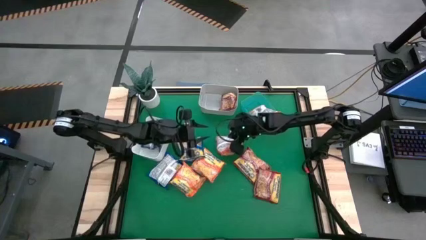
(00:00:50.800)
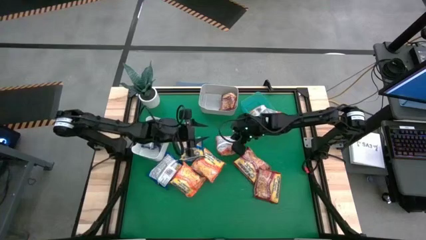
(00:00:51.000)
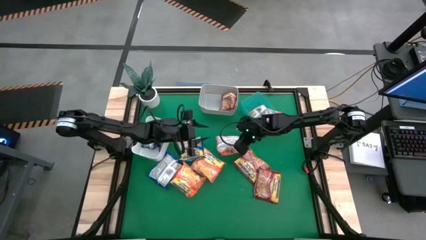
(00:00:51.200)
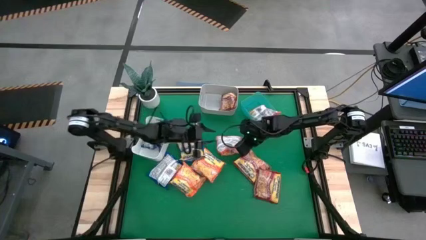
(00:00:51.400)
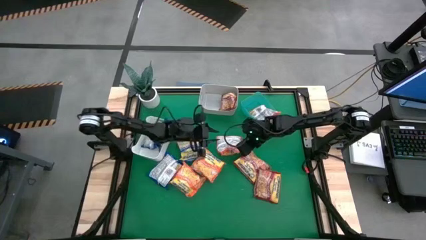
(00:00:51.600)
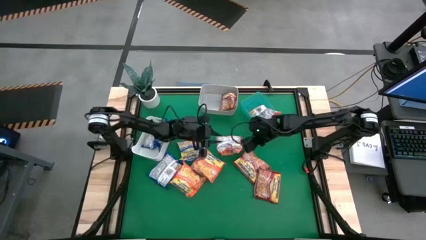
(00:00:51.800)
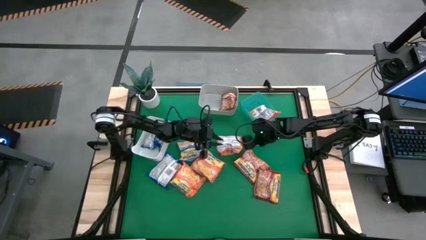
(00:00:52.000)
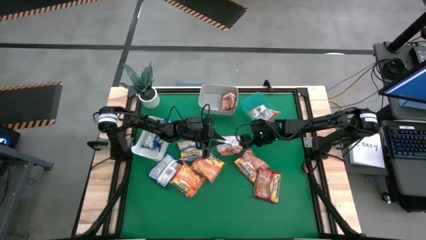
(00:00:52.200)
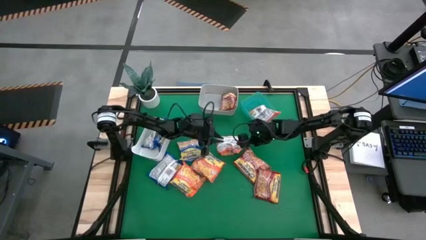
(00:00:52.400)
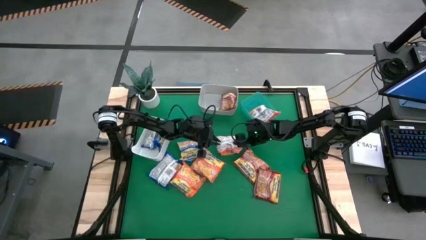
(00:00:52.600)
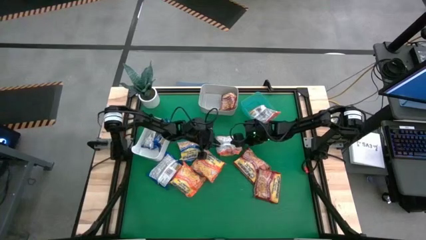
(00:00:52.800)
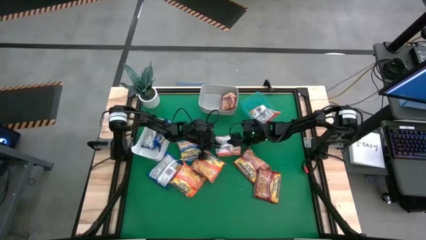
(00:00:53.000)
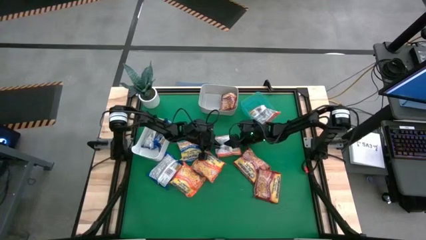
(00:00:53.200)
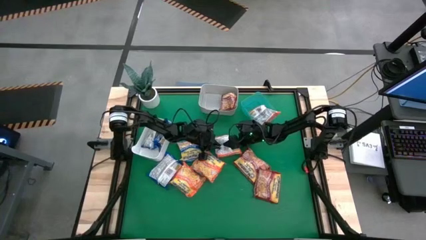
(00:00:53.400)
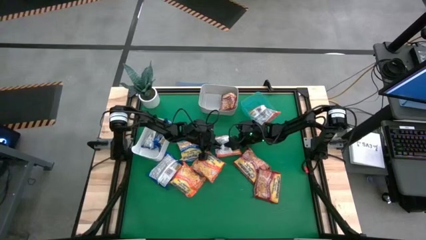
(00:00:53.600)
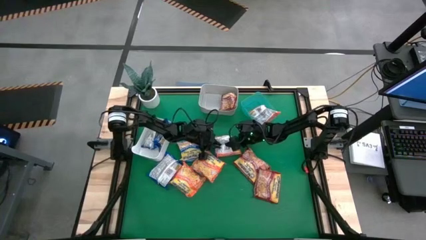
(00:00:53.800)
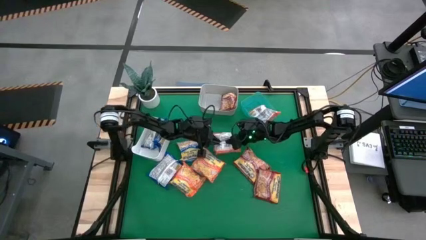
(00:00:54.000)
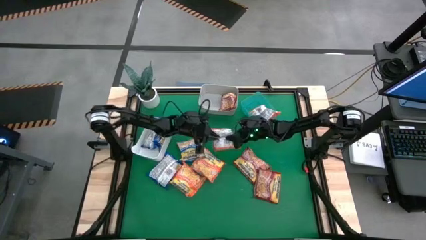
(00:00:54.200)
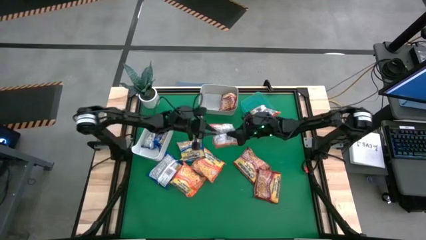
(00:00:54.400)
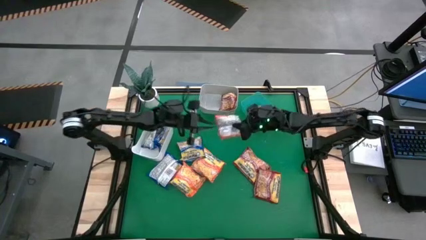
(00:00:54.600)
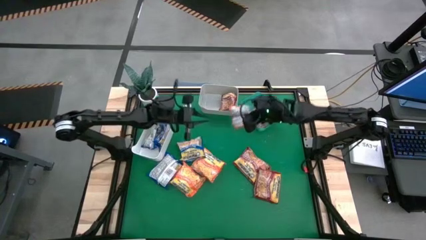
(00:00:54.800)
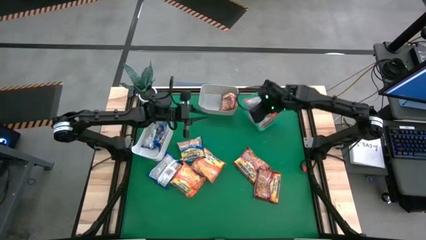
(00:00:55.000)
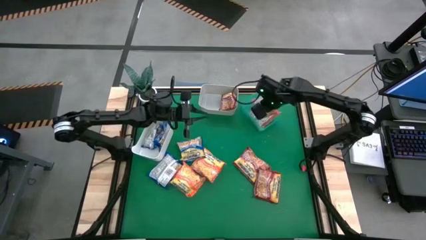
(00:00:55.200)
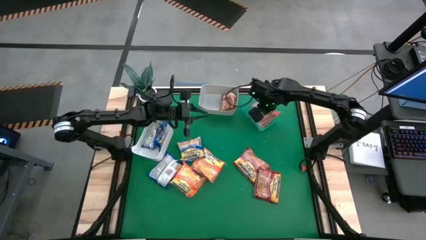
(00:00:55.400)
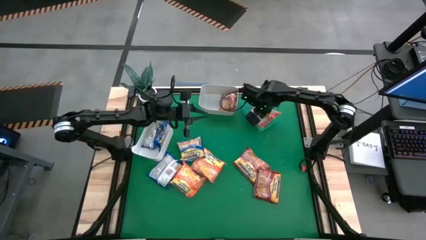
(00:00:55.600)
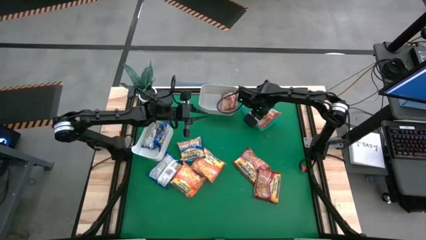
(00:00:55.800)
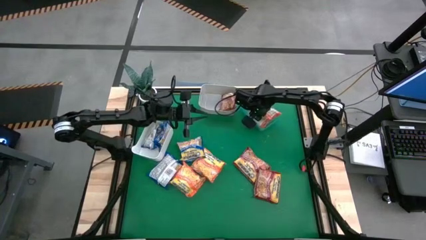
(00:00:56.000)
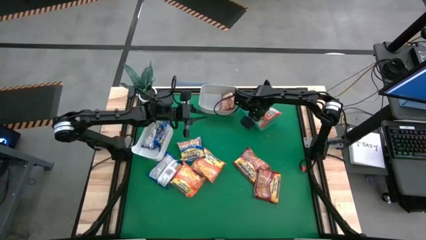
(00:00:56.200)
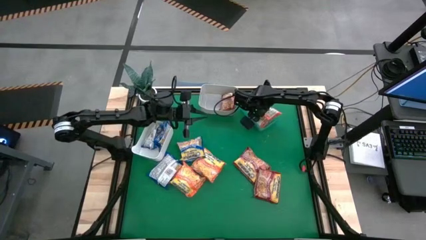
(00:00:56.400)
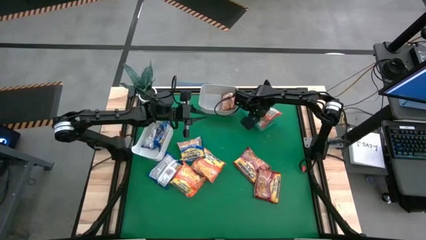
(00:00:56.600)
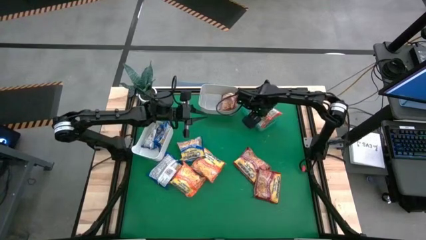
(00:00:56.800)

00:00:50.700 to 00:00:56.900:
Task: Sort Maruchan noodles
Put the orange noodle pack into the green bin

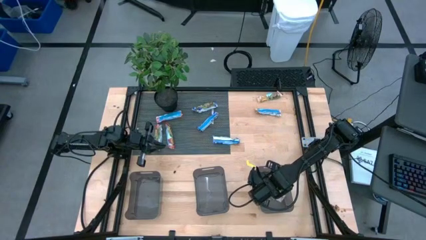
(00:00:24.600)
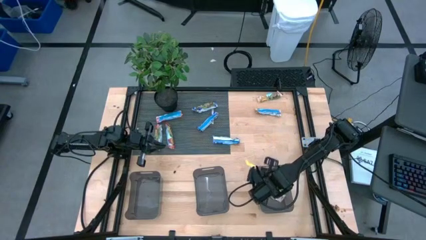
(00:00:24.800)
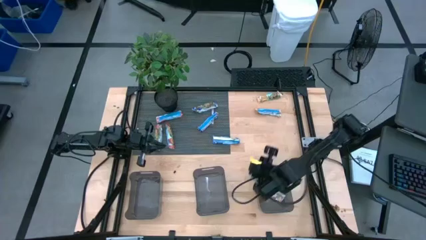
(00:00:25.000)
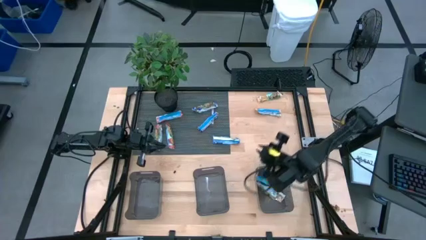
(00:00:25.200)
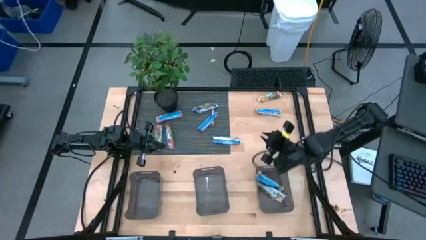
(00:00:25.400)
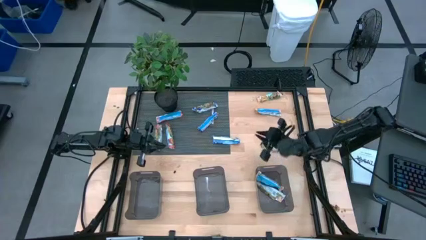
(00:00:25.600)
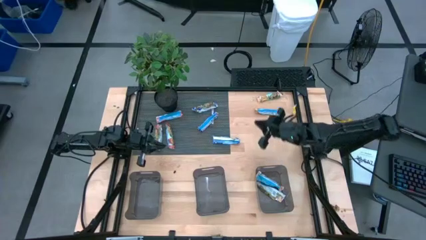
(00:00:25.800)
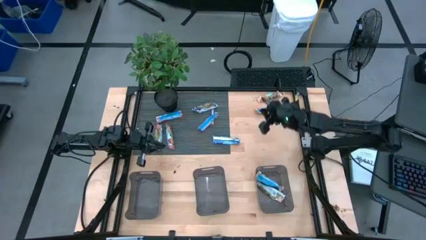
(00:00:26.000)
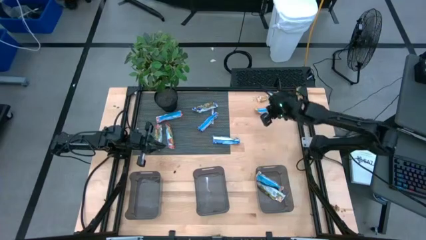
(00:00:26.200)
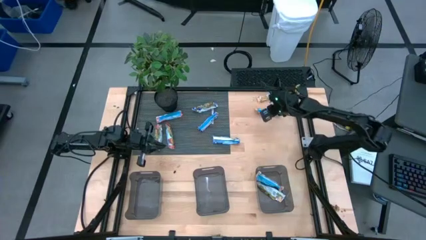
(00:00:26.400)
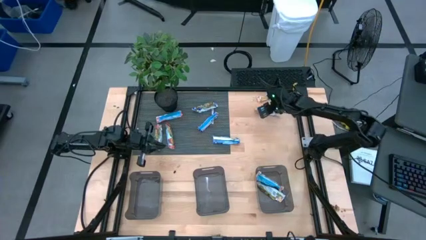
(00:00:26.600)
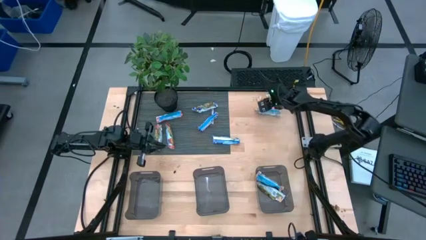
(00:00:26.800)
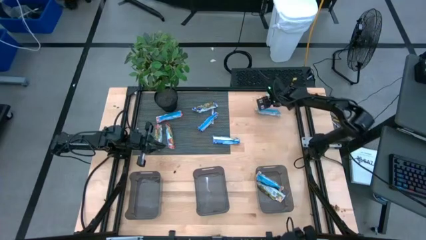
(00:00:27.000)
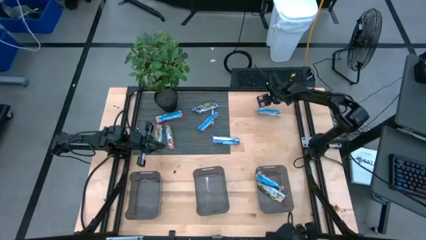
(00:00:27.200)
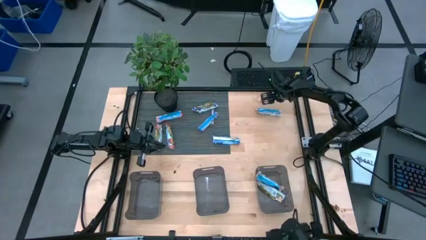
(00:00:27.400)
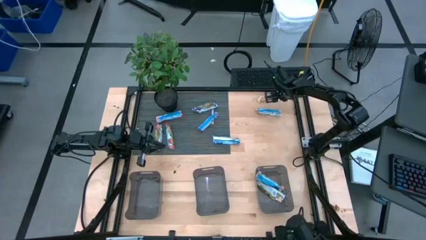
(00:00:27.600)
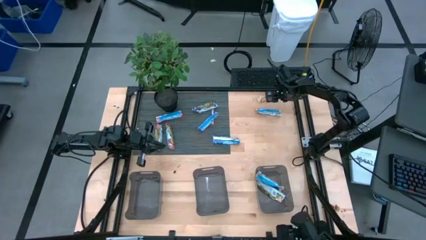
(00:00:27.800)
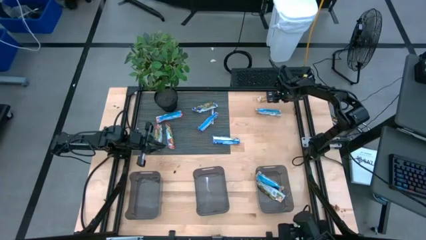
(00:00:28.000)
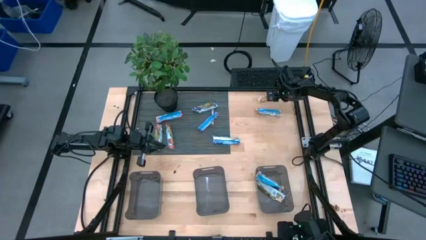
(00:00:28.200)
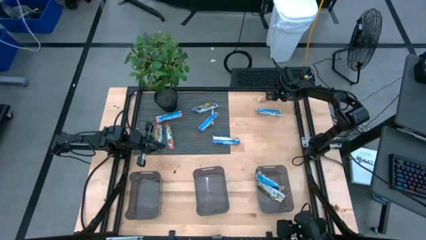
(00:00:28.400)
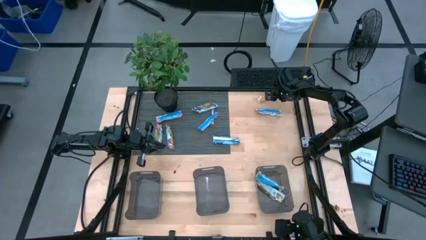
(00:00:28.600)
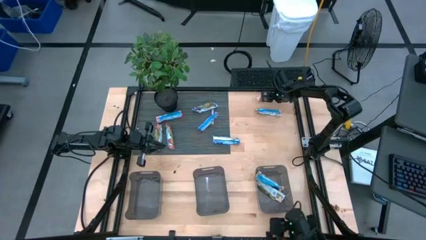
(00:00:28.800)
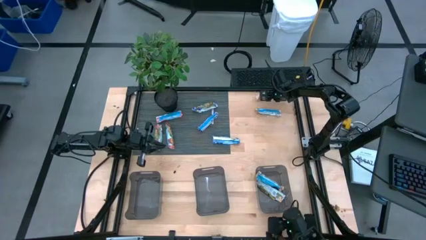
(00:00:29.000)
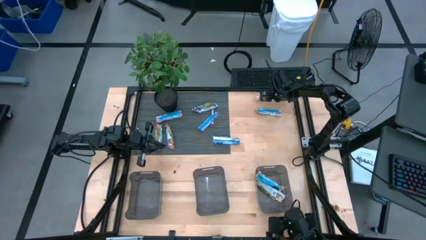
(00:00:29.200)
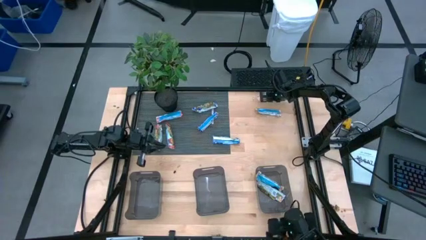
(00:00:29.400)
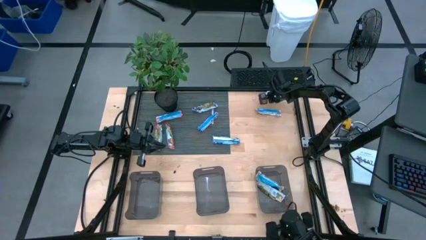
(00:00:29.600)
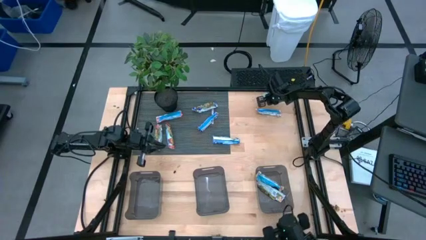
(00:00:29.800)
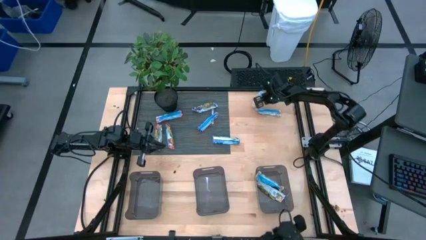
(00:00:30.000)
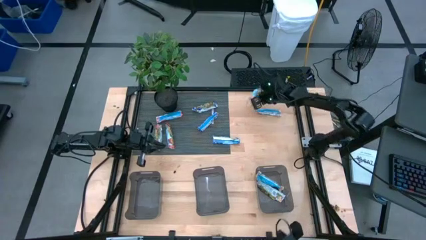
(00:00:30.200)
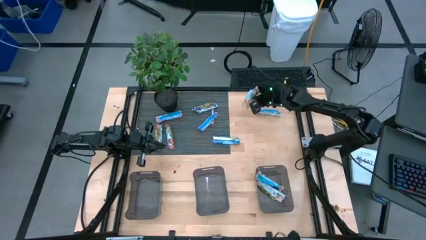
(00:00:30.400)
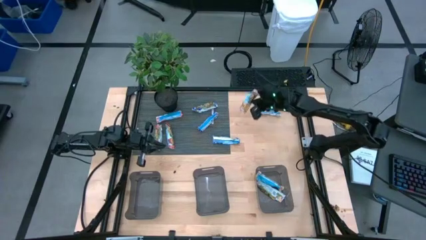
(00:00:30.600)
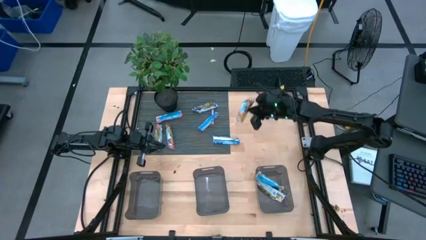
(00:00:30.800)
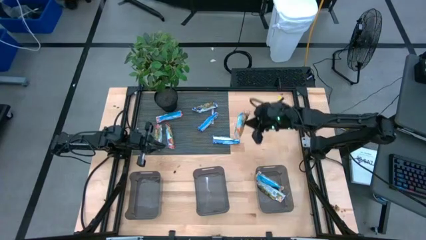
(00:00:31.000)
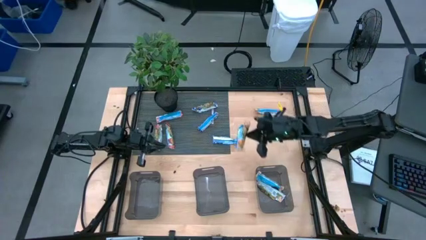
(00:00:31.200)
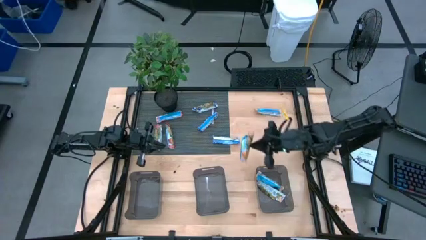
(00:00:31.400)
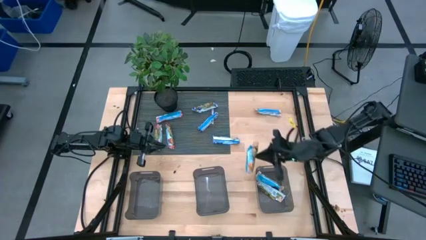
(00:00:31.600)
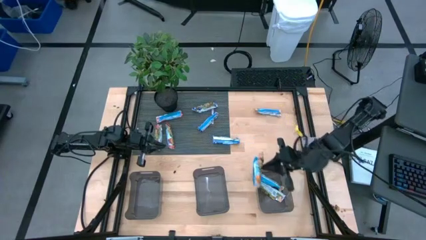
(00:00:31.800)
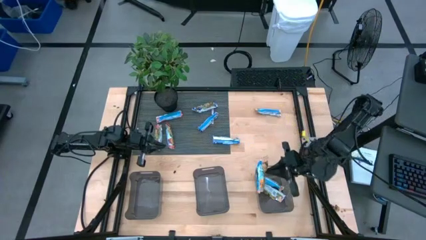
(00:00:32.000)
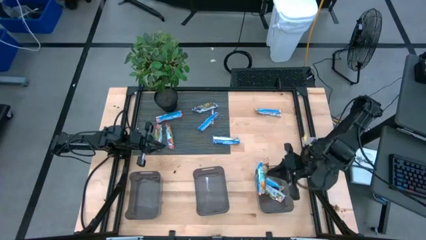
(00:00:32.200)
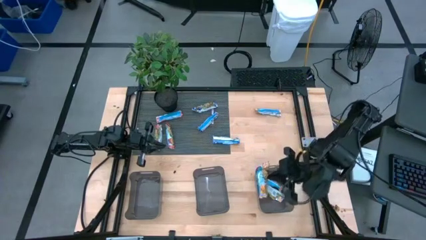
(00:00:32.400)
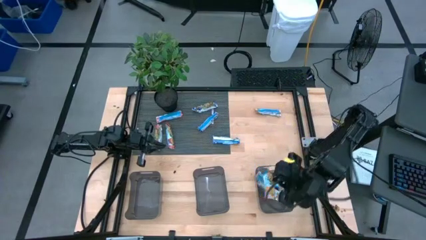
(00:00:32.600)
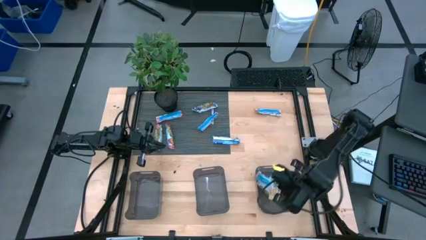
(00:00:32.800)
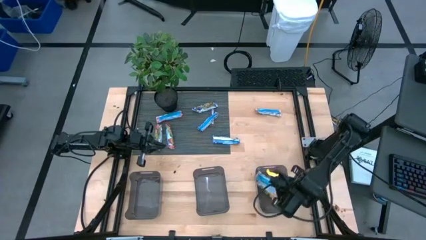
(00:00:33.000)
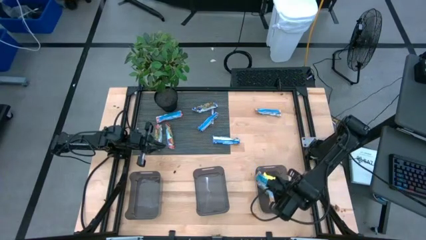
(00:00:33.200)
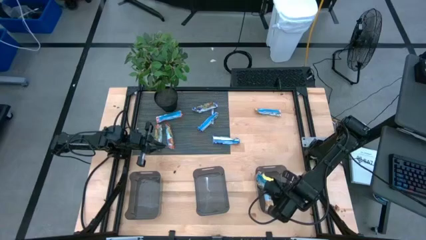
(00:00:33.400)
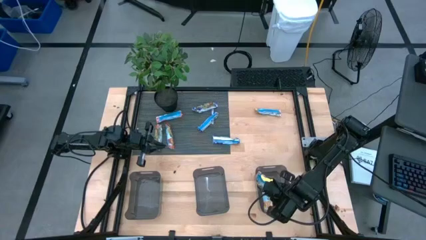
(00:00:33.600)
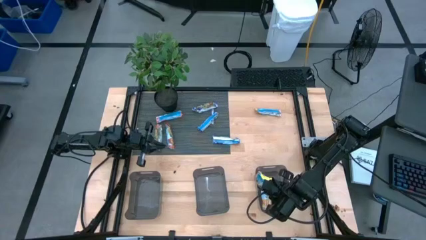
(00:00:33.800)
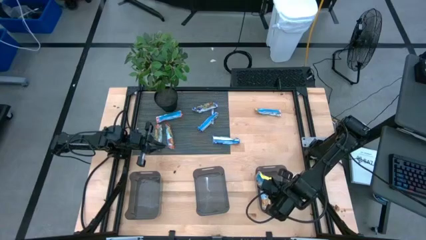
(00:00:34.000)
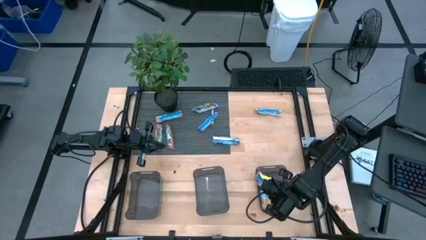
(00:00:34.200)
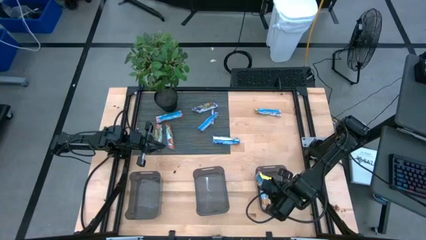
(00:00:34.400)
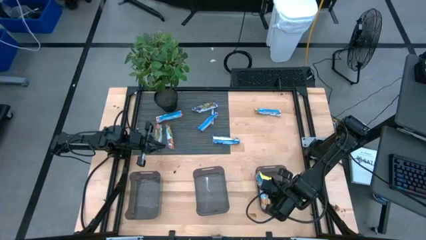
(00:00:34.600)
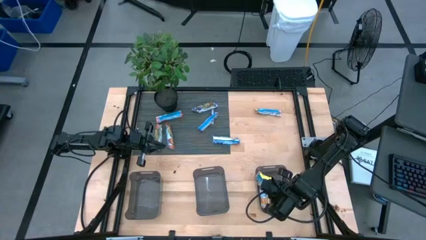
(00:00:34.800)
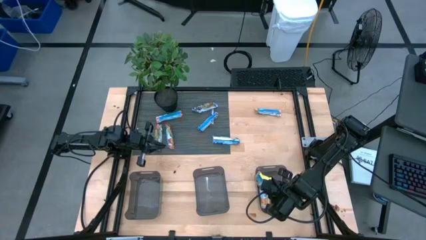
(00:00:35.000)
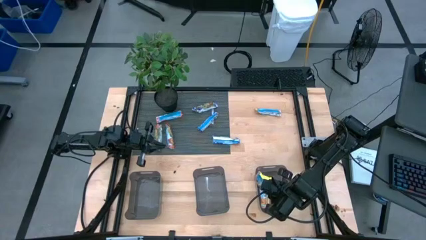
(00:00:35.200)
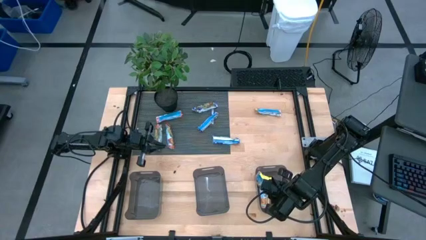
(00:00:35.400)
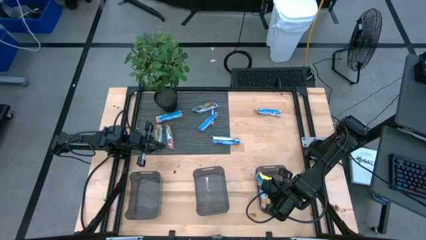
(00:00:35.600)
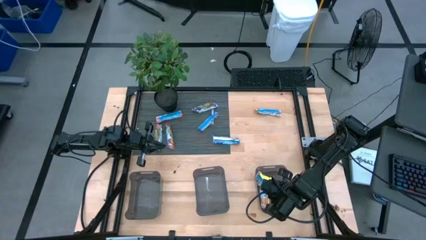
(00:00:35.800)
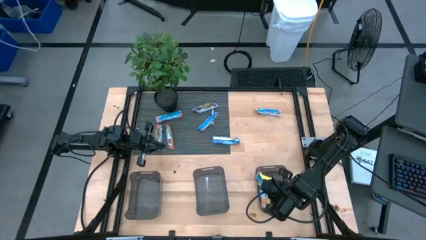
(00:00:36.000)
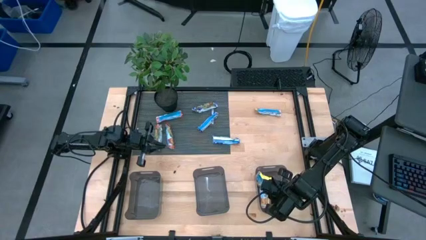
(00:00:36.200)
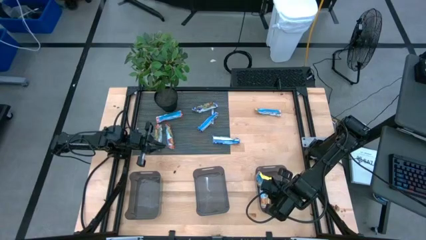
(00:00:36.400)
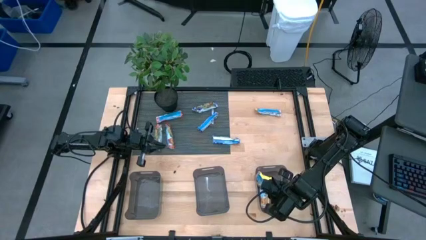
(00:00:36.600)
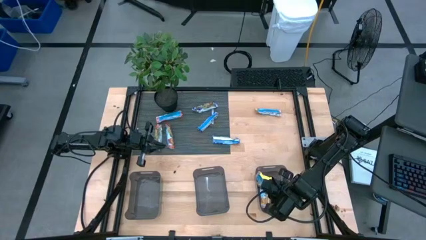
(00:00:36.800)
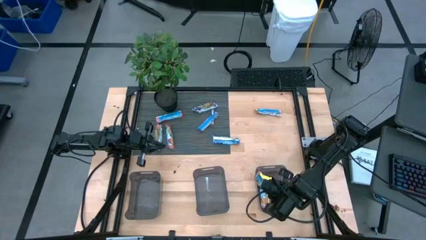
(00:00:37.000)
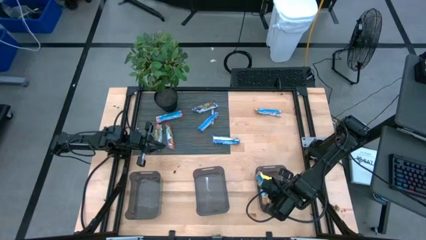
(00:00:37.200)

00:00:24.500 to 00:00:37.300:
Task: Pick and place Granola Bars by type
Put the yellow granola bar into the right black bin
